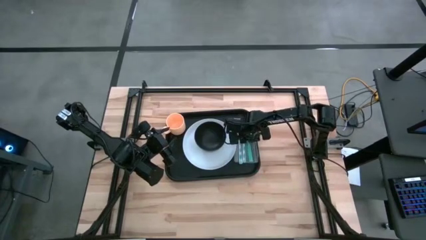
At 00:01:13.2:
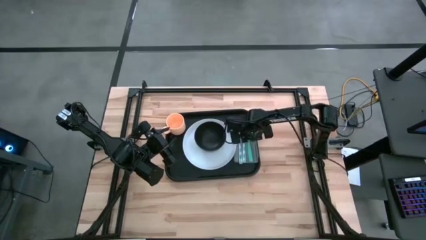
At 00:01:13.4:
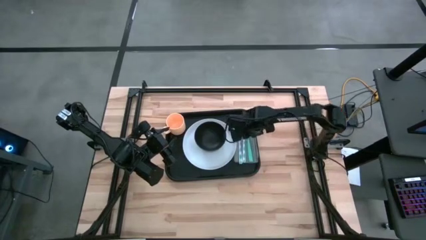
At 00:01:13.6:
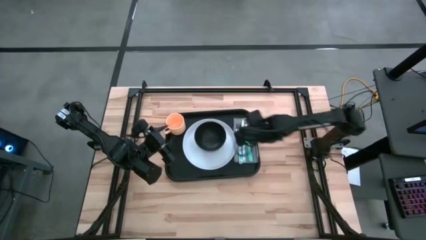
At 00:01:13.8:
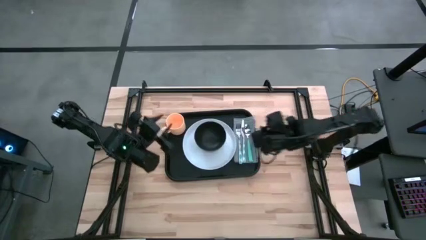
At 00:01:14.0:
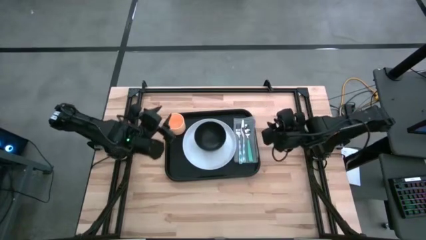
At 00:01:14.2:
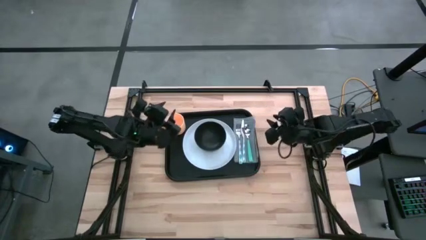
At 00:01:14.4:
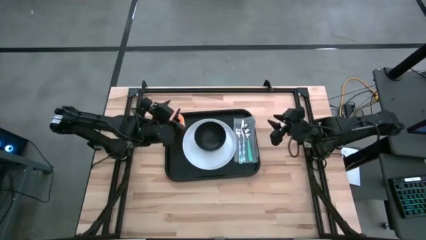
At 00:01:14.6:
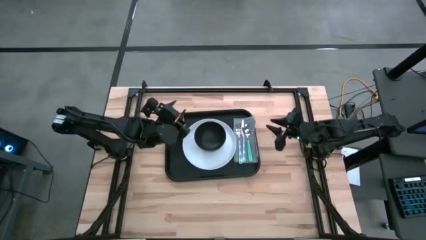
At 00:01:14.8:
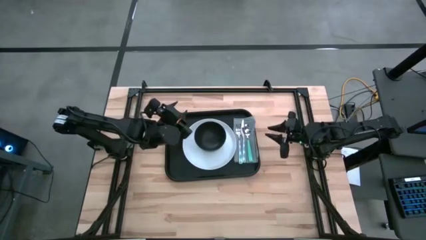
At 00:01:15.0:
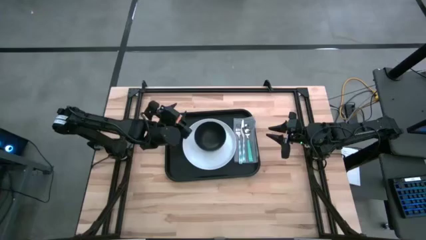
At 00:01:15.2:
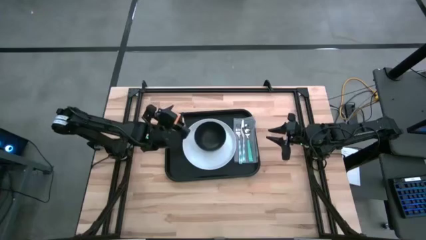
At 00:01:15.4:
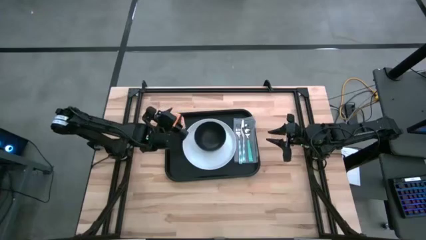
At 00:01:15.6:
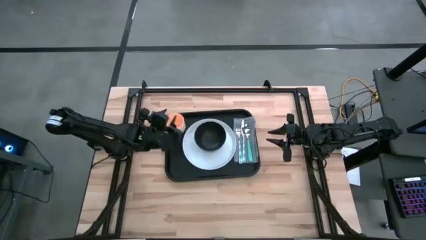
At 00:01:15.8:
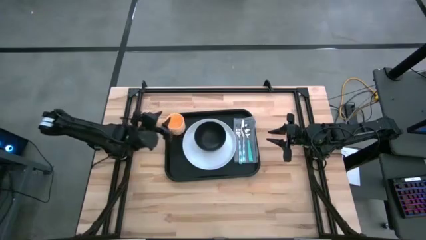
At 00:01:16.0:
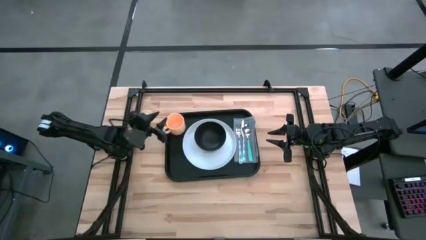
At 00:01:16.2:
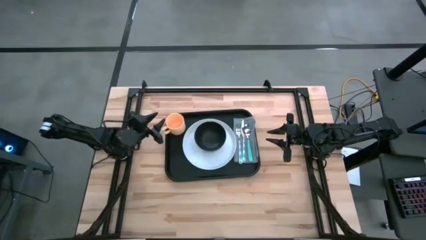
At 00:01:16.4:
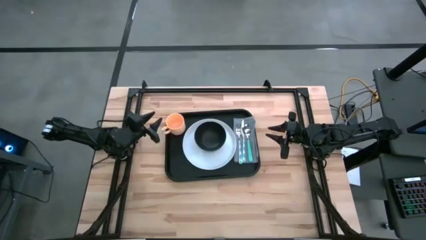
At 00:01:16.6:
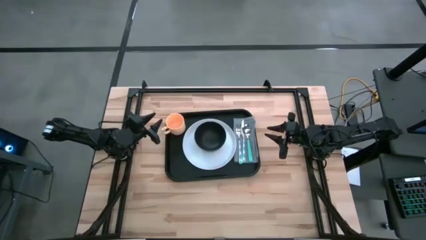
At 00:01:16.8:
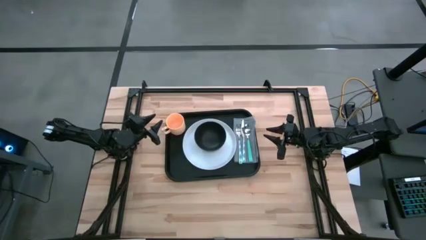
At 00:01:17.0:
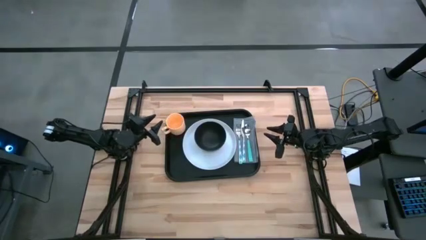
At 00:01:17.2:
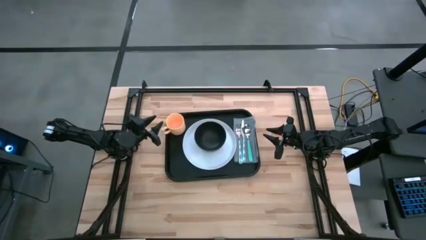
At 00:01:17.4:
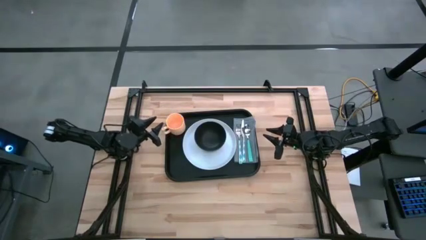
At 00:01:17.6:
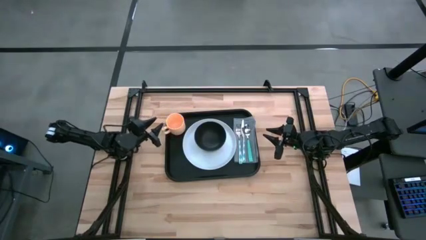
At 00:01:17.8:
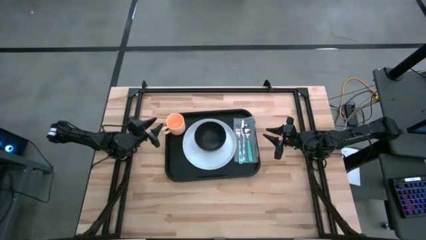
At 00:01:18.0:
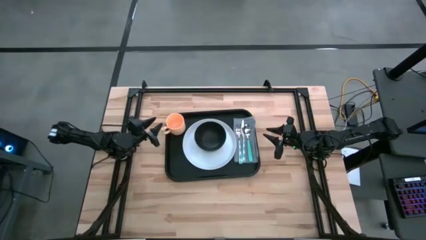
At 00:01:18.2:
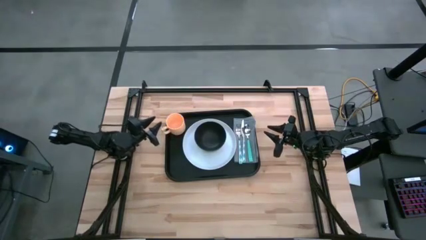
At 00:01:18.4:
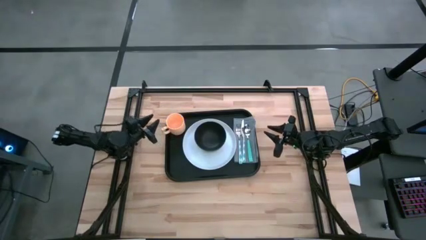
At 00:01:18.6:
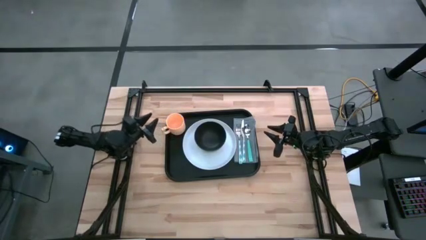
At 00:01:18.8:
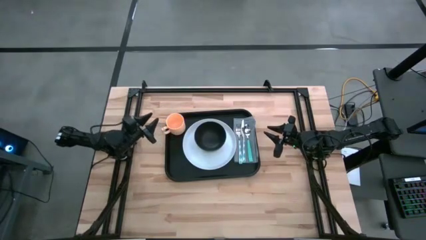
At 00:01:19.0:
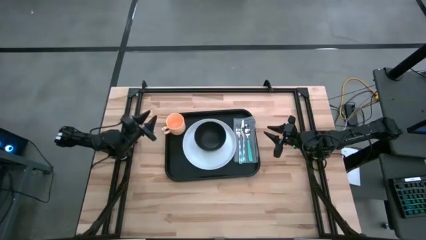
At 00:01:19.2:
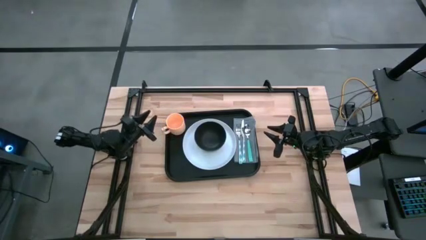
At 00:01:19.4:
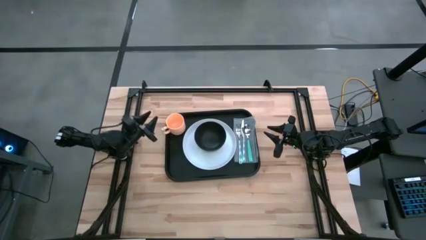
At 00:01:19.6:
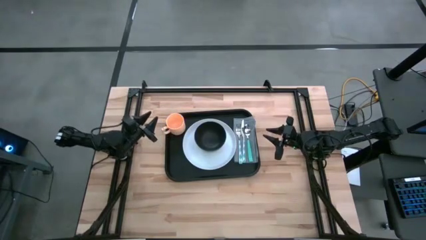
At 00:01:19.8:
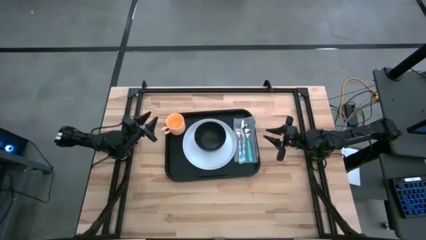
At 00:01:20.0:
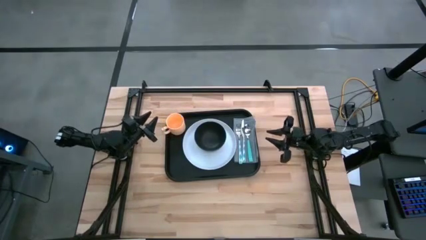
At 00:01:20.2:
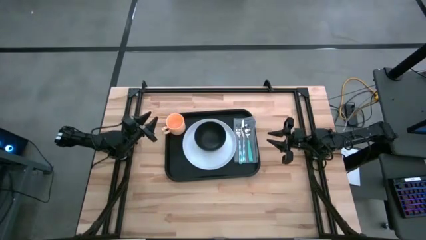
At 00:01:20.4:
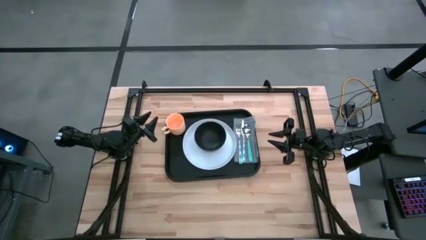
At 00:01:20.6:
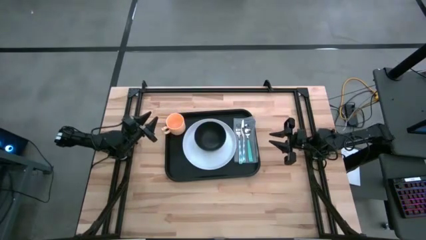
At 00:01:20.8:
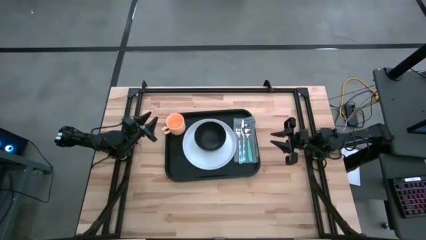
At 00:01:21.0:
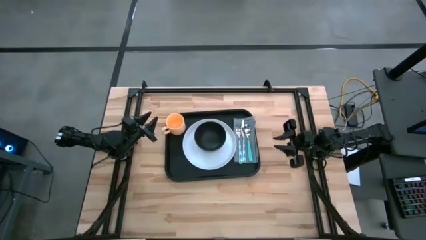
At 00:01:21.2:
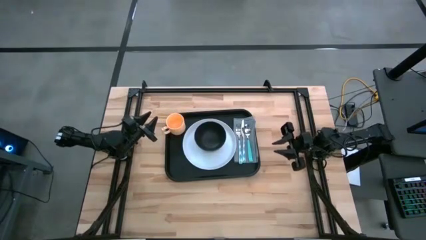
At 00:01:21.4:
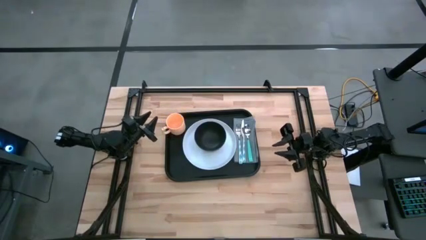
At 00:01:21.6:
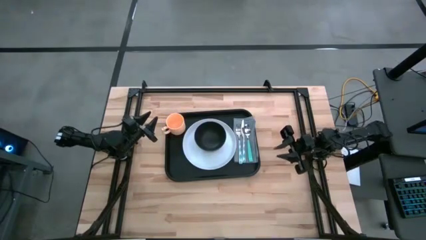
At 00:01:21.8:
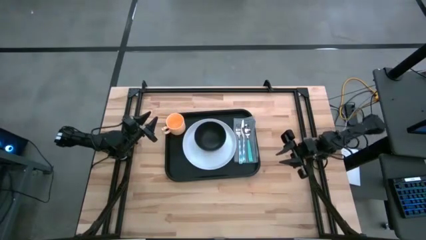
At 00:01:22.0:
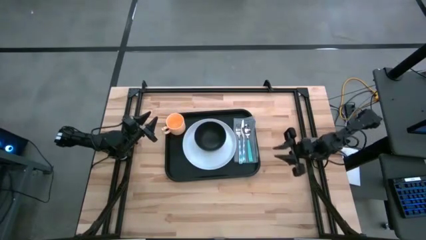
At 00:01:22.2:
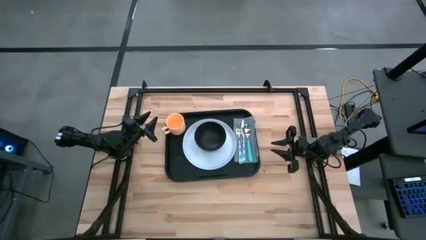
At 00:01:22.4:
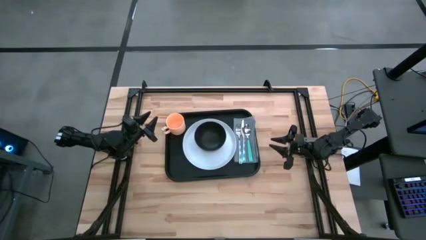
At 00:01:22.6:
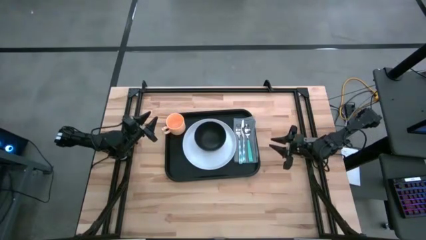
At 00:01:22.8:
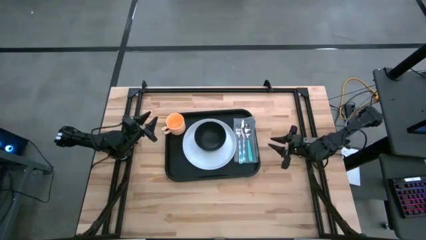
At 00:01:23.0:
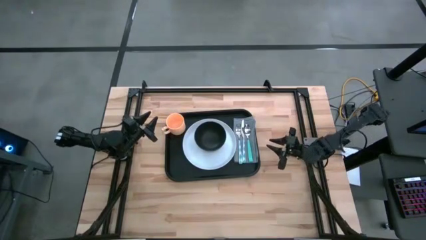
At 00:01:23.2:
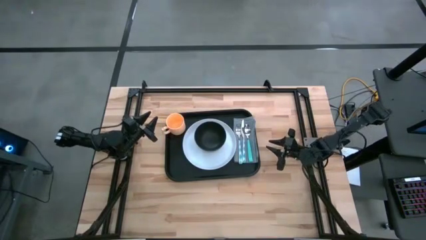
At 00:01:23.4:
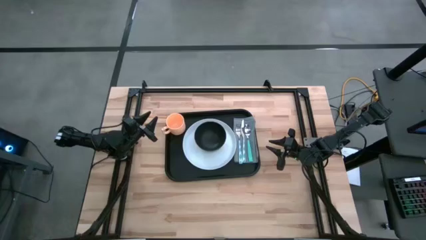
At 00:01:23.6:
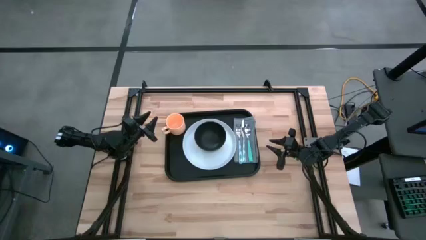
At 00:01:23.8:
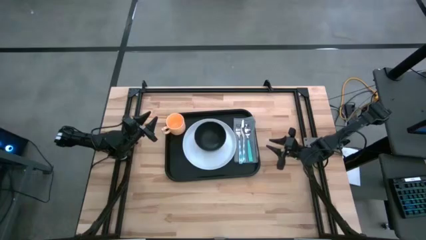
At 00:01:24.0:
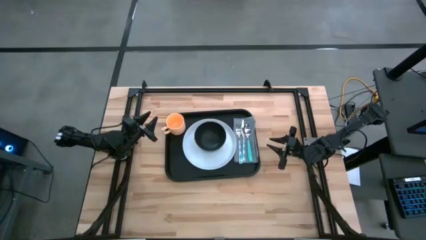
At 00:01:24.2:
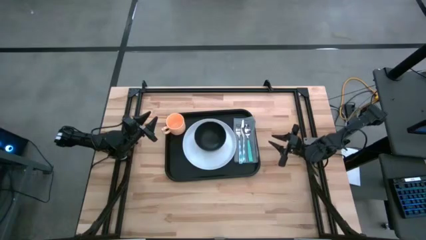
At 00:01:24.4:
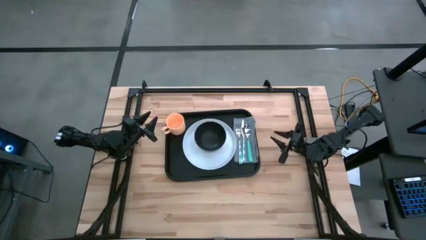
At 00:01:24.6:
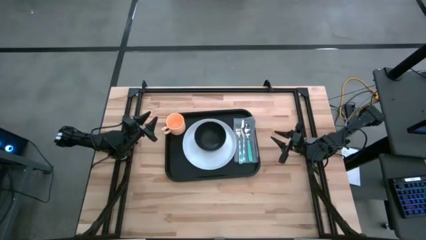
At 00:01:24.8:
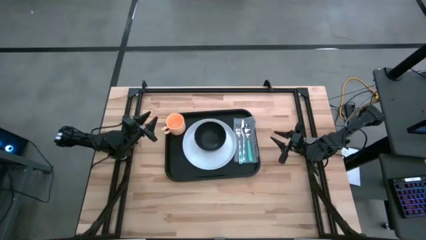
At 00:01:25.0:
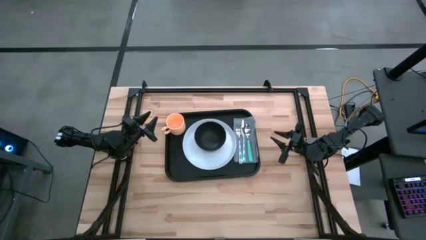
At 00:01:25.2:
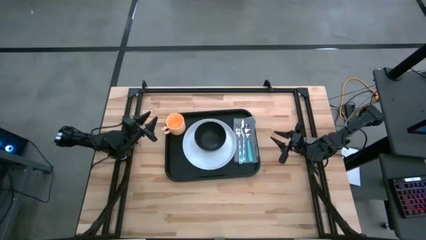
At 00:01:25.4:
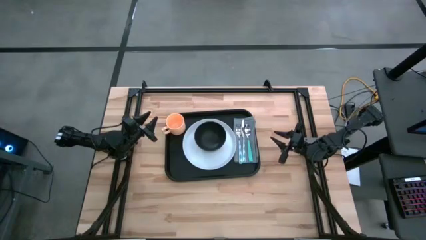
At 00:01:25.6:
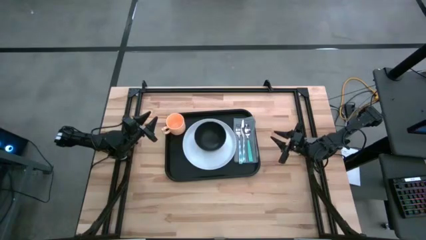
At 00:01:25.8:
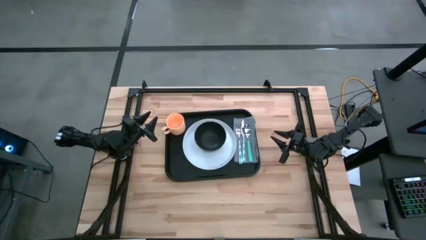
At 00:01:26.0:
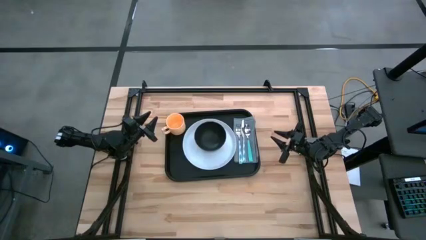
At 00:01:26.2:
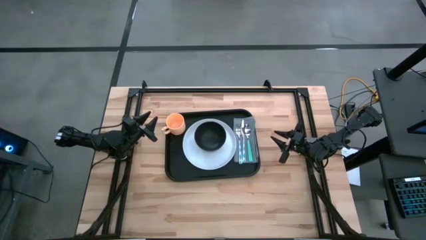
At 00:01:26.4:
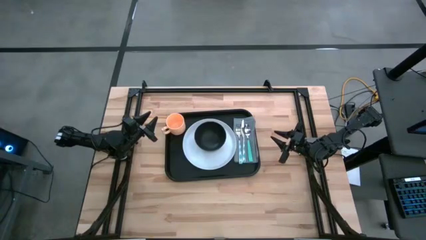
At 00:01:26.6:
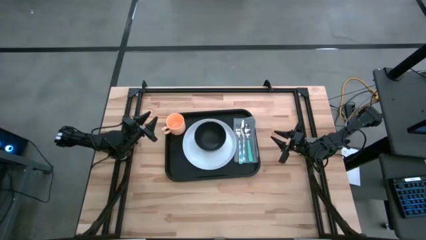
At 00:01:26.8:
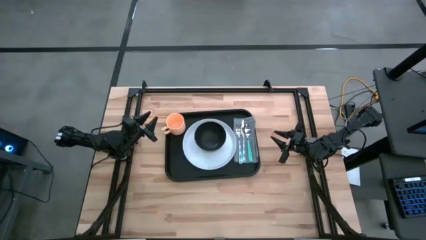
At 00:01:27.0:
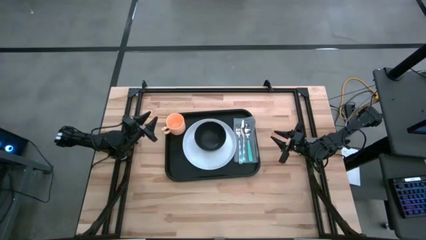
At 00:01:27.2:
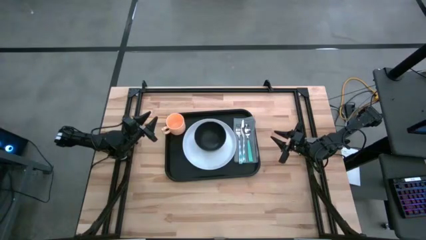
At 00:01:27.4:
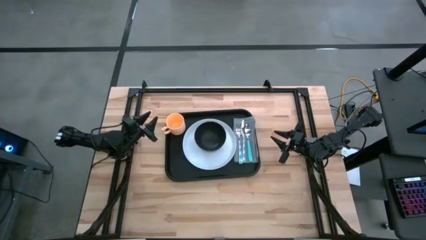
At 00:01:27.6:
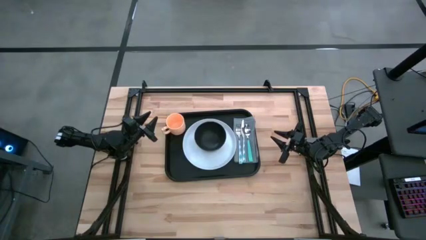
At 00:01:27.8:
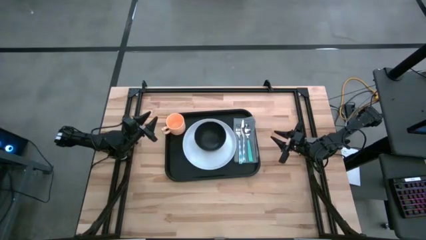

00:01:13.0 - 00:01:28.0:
Task: Set up tray
Return to Home Position

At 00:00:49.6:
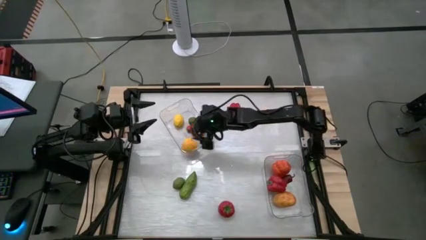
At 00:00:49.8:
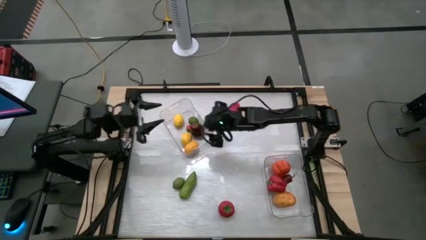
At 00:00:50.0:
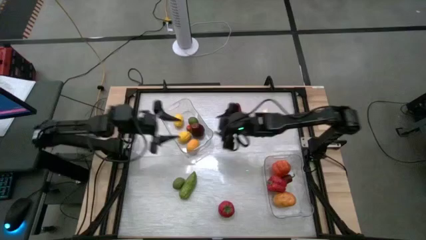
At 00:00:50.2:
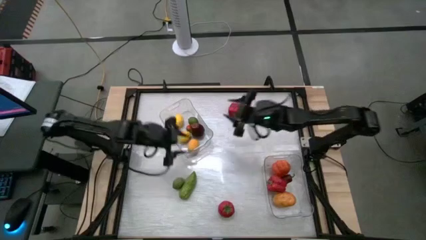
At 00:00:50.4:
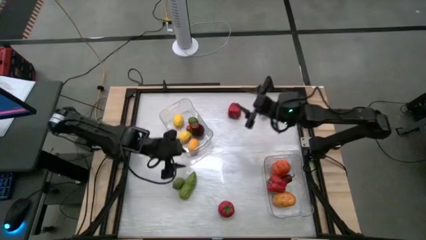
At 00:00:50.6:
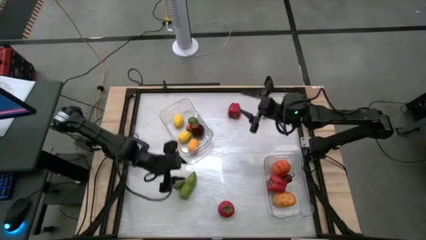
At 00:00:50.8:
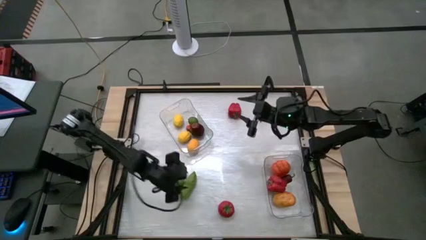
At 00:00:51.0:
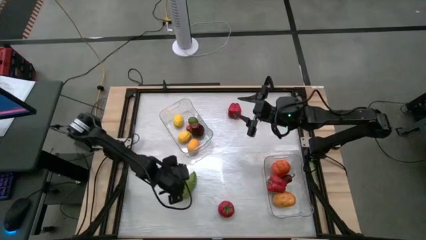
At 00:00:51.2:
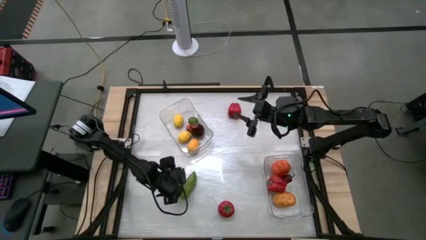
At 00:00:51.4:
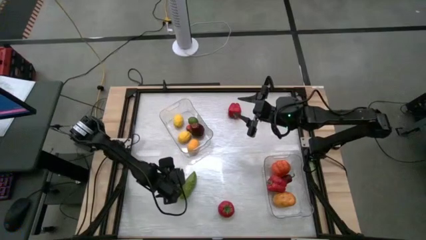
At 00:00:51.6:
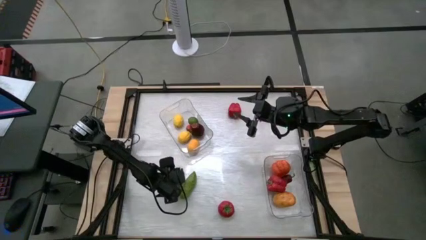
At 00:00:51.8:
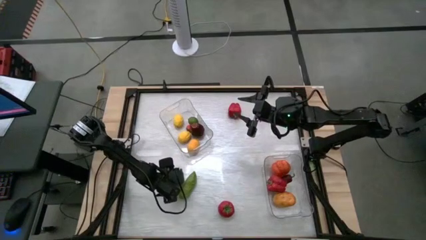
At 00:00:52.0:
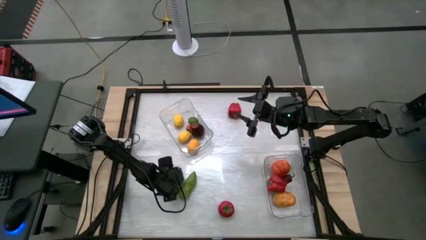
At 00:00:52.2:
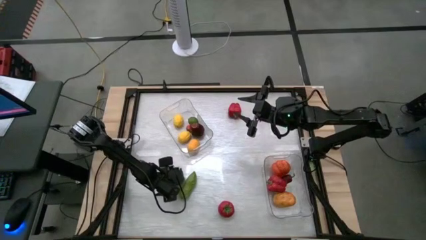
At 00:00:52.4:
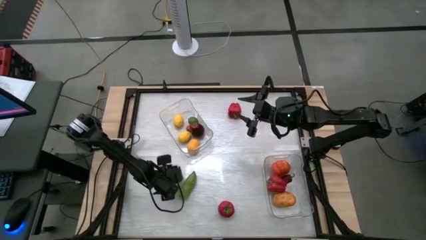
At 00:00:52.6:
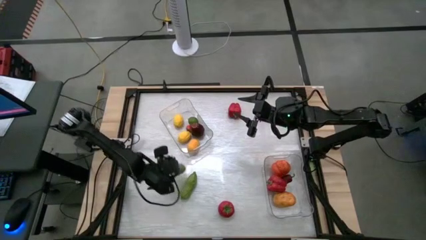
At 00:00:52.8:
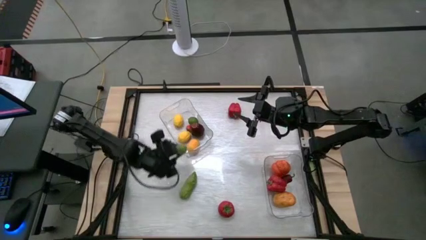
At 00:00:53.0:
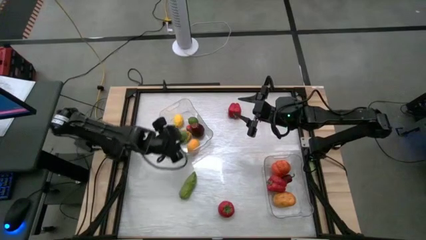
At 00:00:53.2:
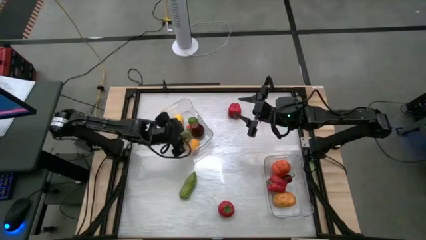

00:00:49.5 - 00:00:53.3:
Task: Sort produce into baskets
Put the green lime into the top transparent bin
